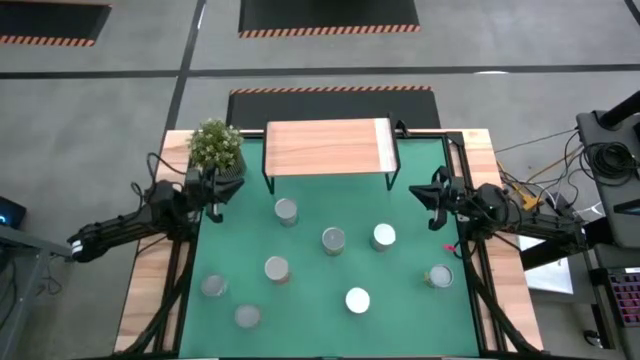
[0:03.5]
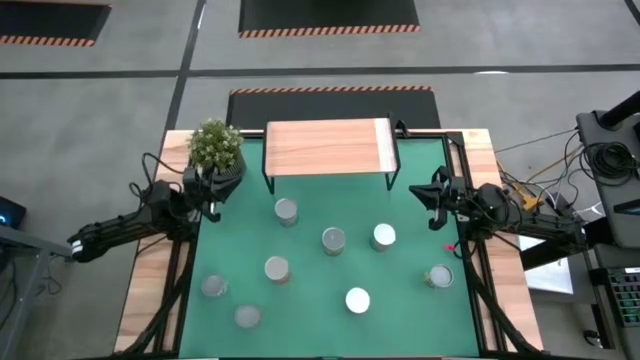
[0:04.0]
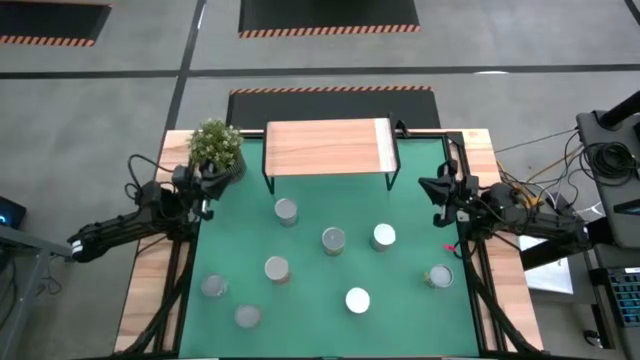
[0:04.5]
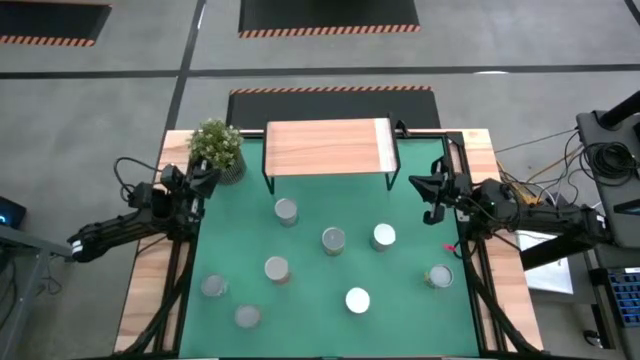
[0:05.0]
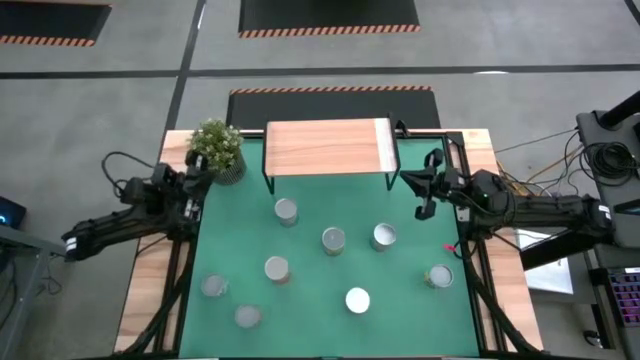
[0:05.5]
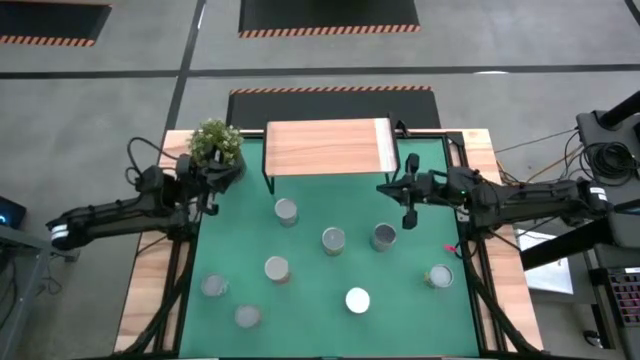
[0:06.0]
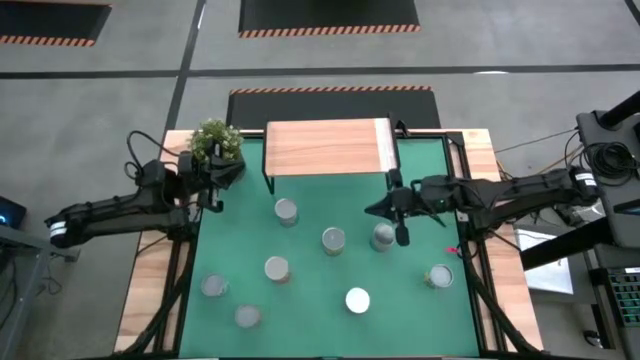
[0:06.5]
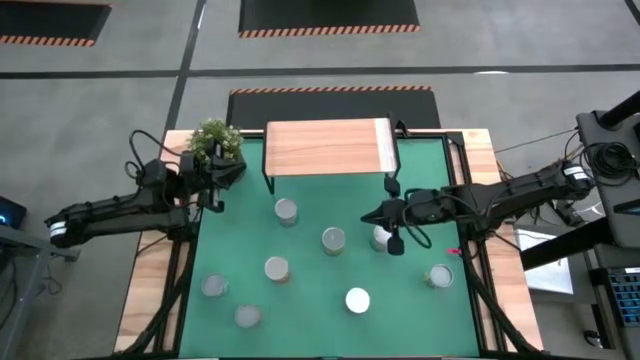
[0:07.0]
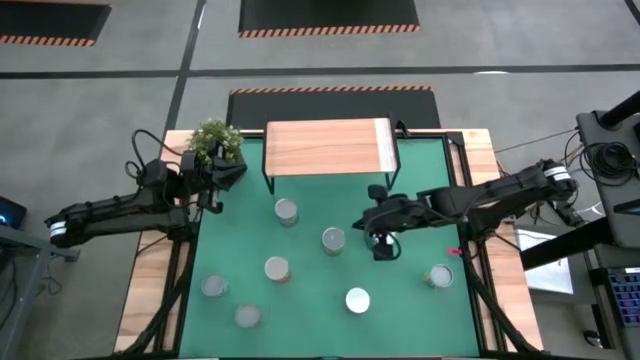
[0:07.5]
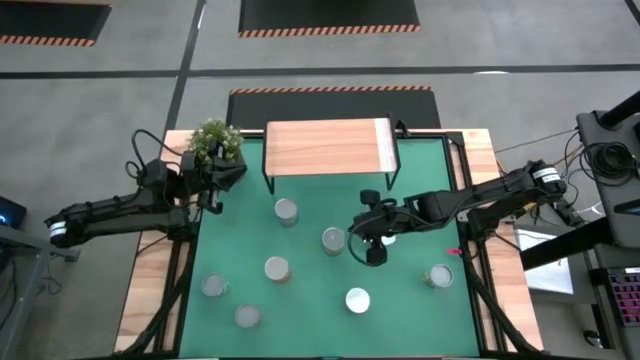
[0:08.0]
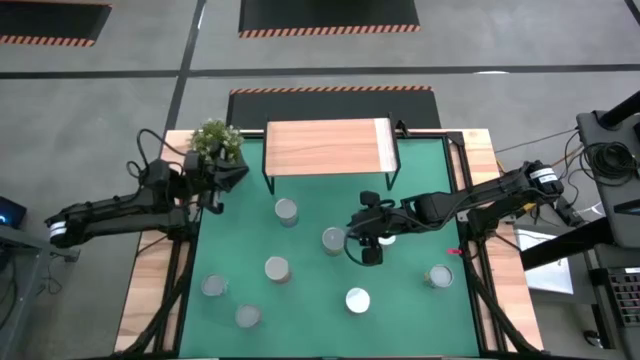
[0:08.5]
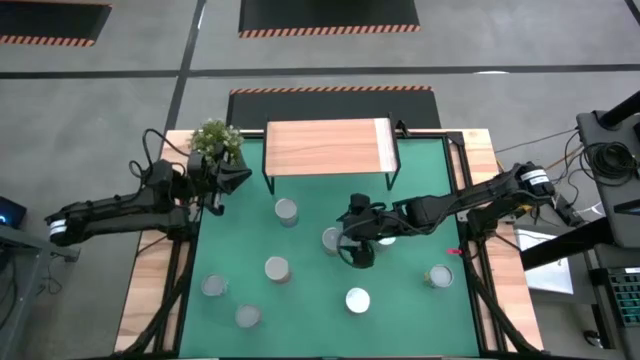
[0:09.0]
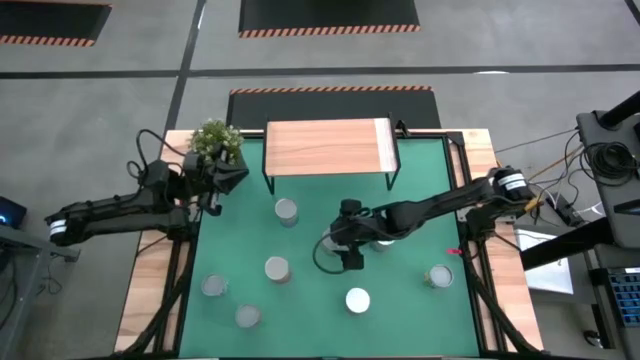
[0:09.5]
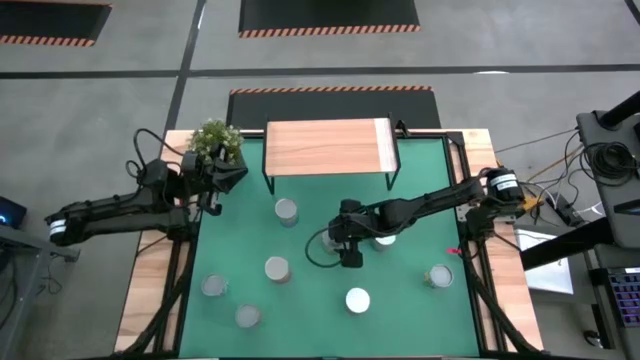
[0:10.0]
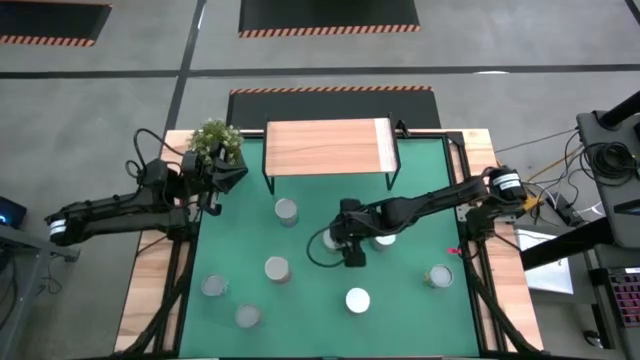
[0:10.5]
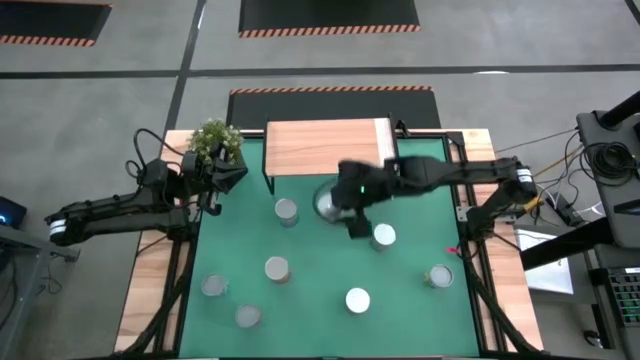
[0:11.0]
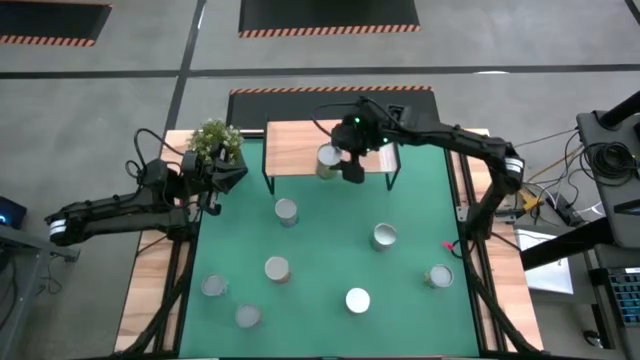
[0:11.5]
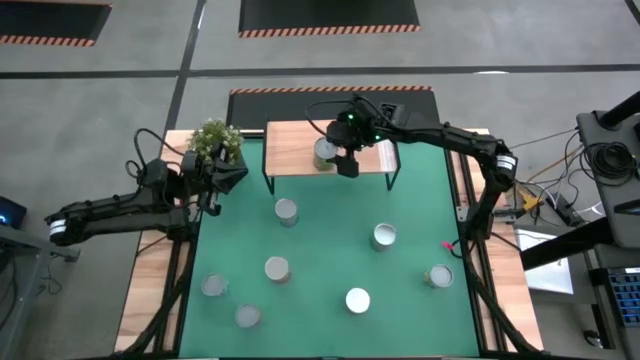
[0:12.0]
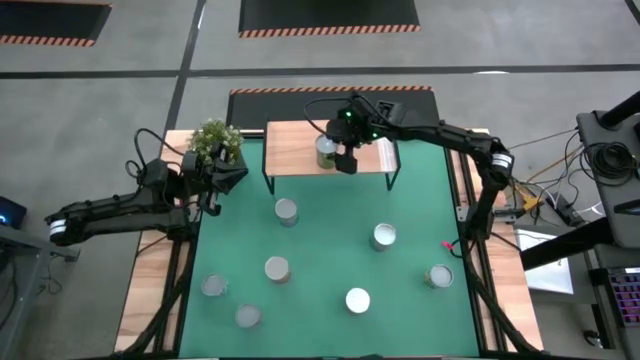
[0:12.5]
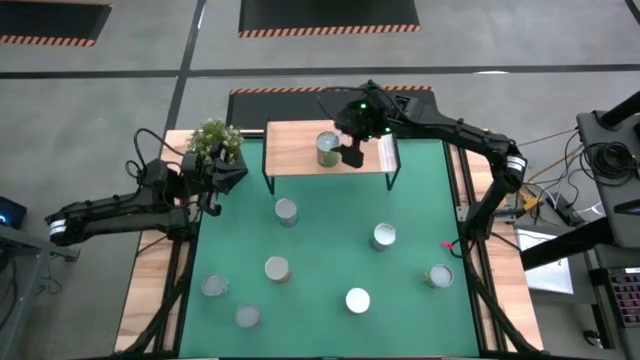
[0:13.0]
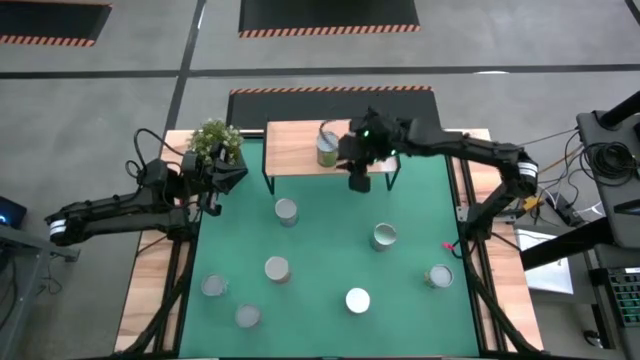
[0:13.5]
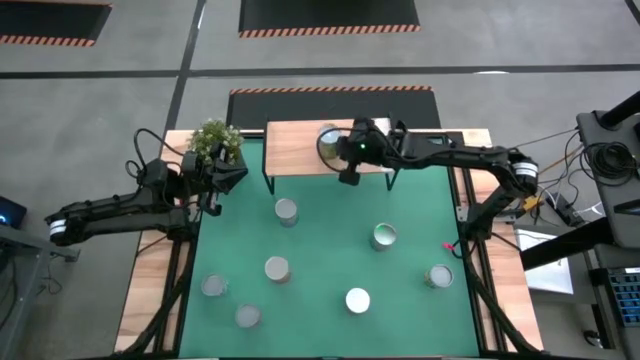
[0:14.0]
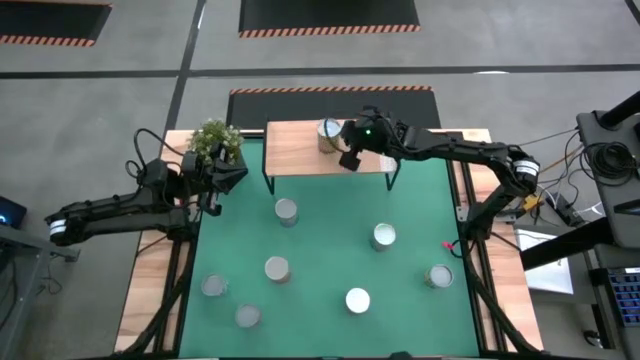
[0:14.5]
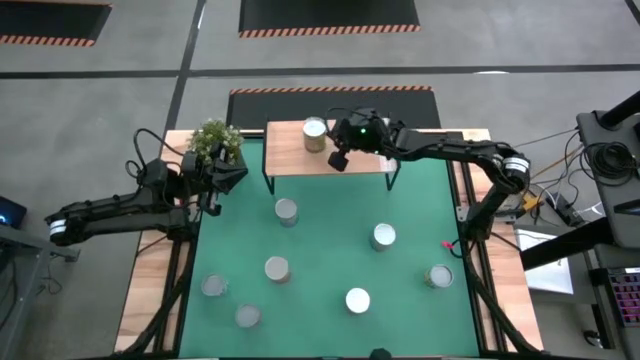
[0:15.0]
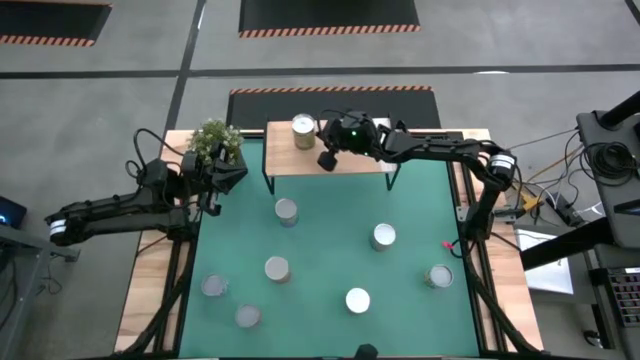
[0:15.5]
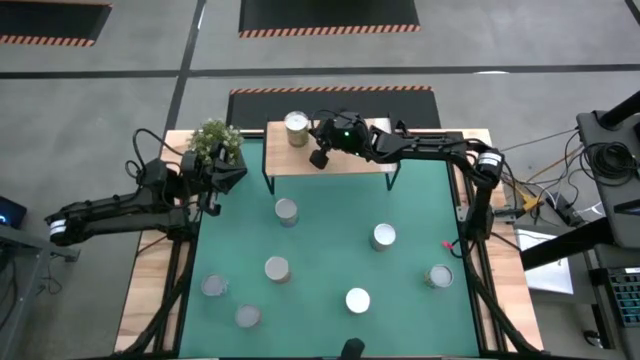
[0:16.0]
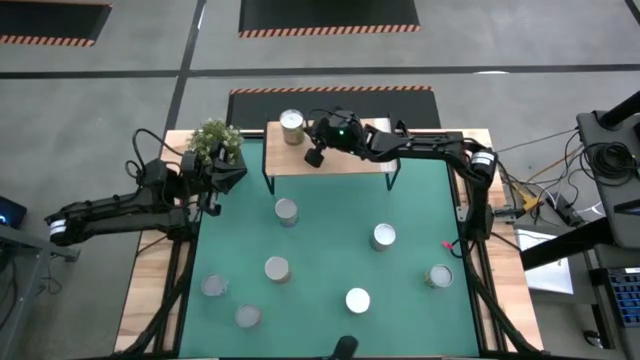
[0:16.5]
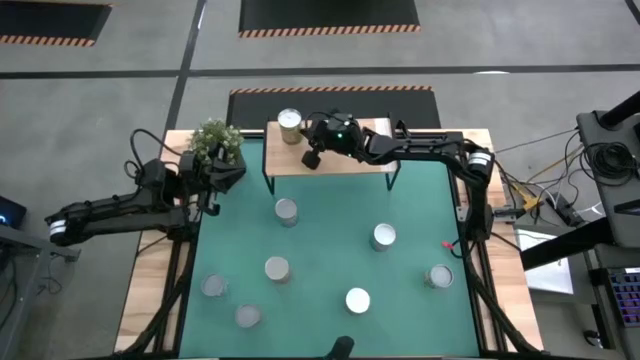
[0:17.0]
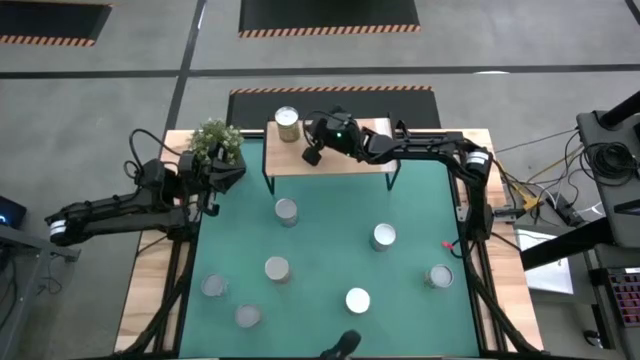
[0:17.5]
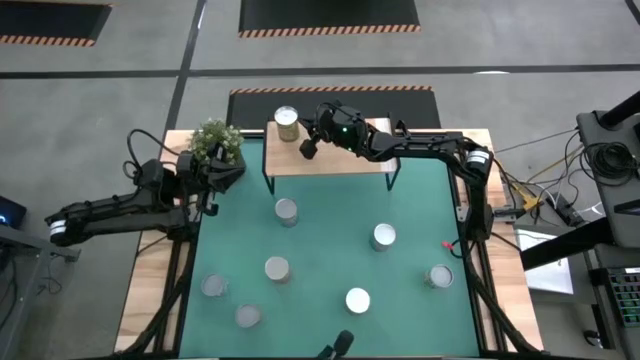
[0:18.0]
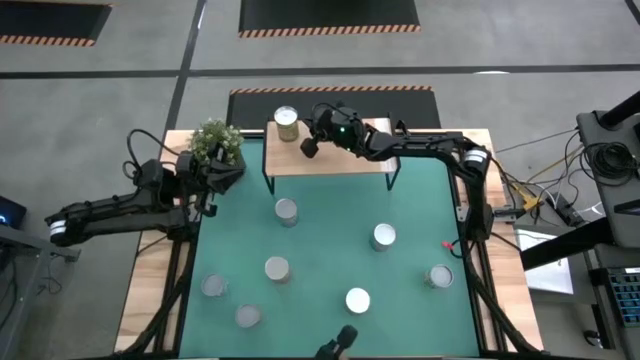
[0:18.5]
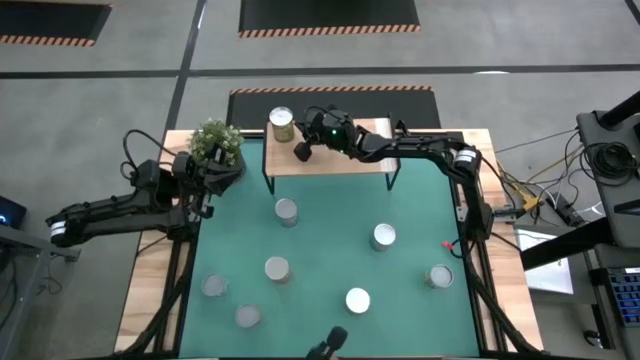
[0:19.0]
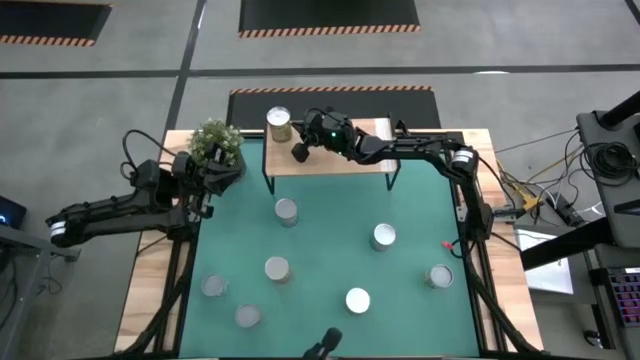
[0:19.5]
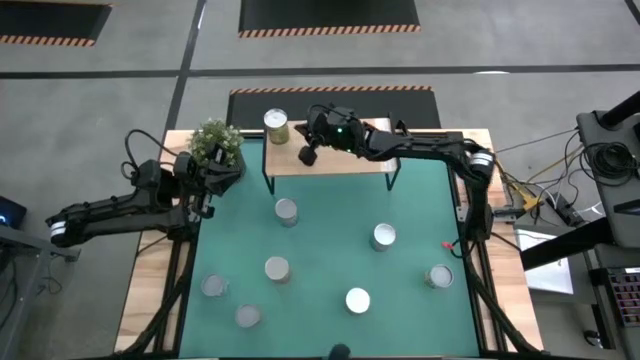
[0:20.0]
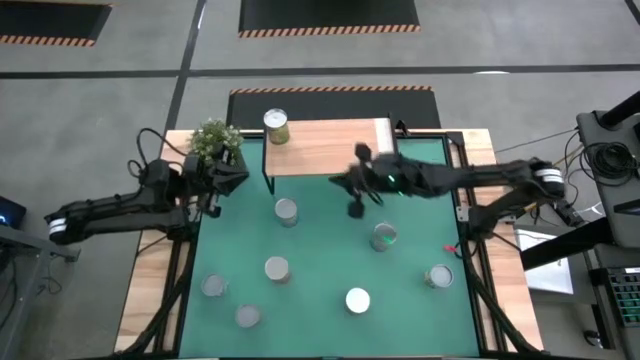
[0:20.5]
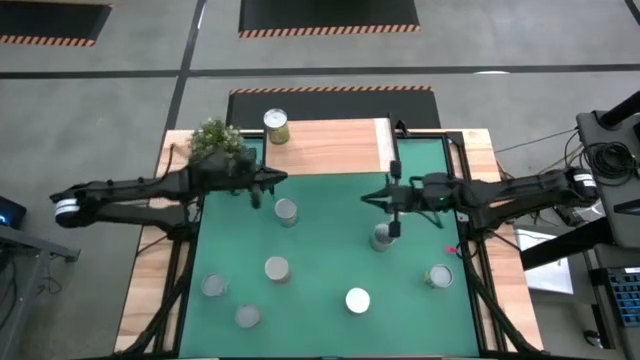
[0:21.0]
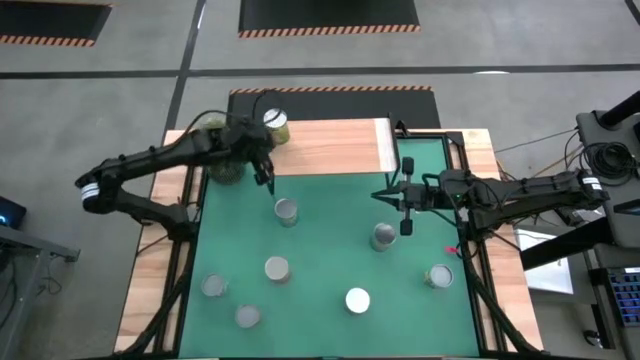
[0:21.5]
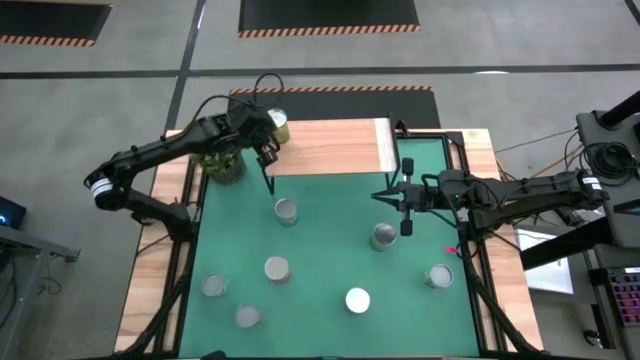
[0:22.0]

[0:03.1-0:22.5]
Task: Pick and place cans onto a shelf
Put the big canned oranges on the shelf

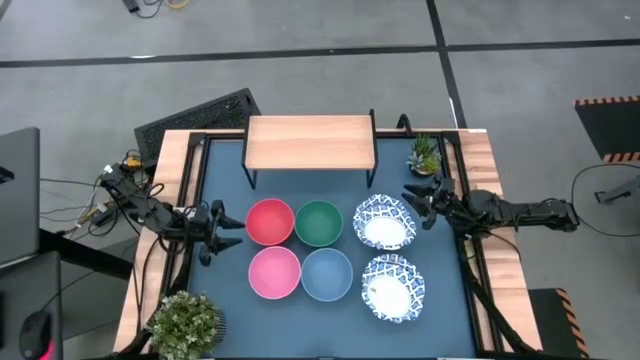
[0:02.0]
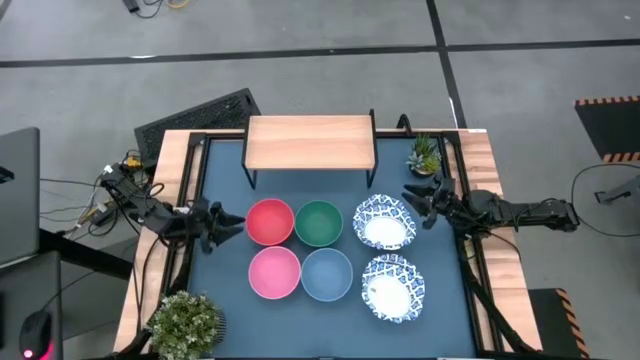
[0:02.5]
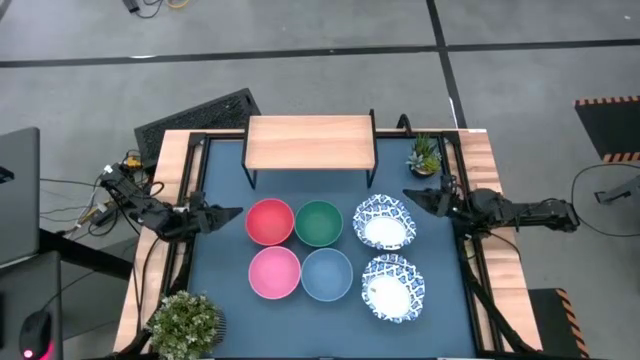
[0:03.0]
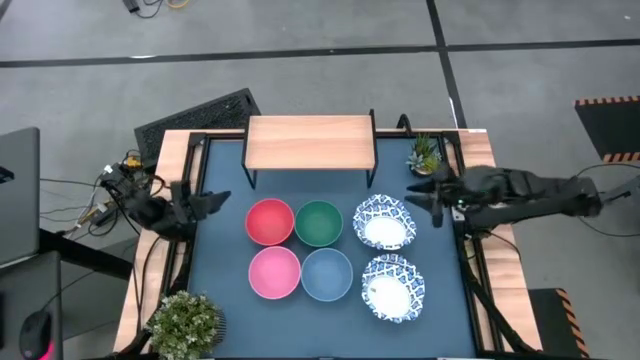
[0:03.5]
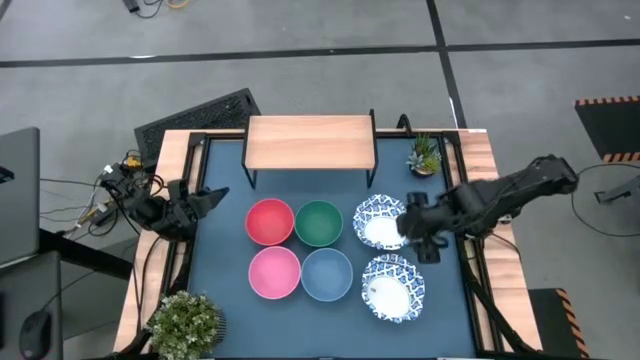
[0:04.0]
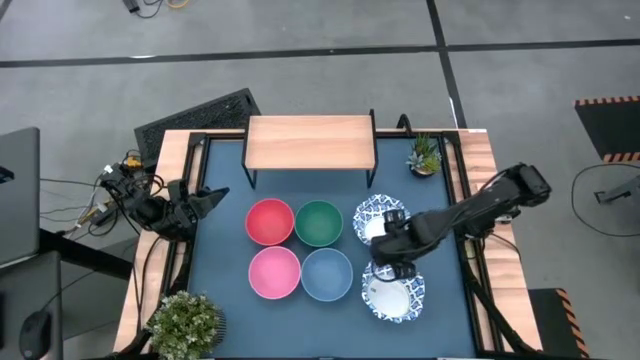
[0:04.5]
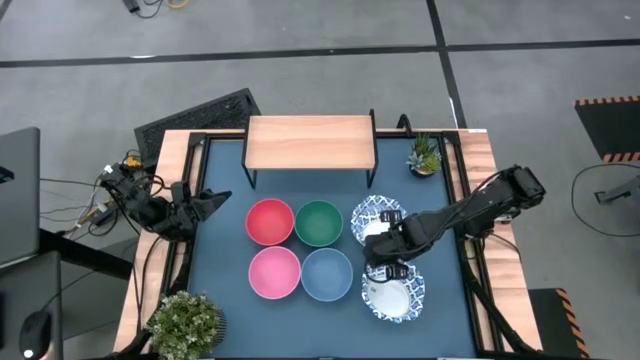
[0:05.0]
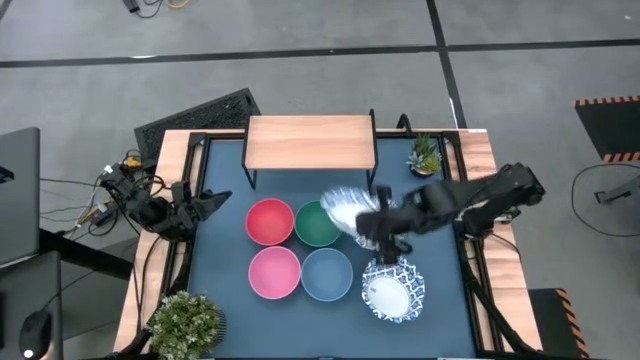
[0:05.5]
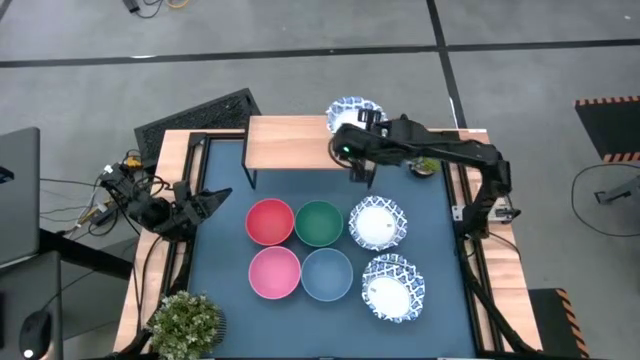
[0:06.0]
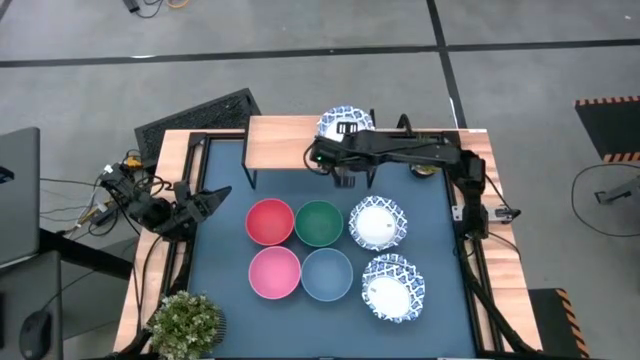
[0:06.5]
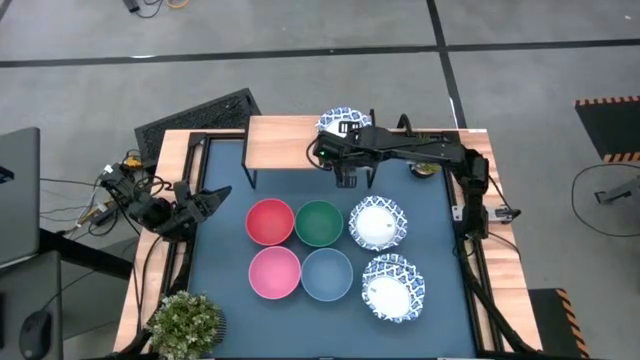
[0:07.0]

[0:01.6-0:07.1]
Task: Place and stack bowls onto a shelf
Put the top white patterned bowl on the shelf
